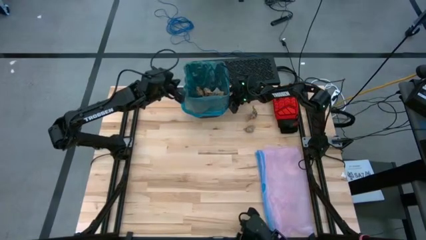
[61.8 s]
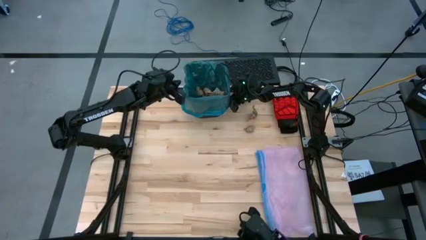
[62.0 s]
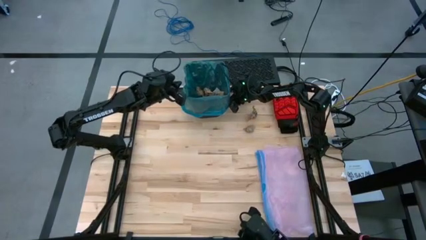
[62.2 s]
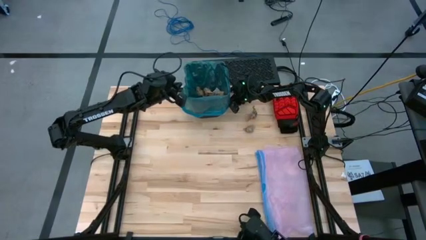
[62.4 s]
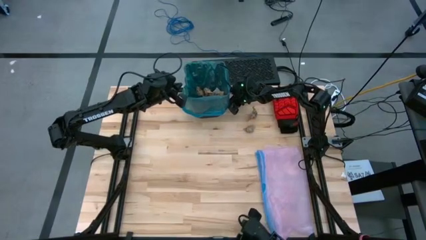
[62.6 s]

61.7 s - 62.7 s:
Task: place trash/remove bag and relplace
Put the brown paper into the black trash bin

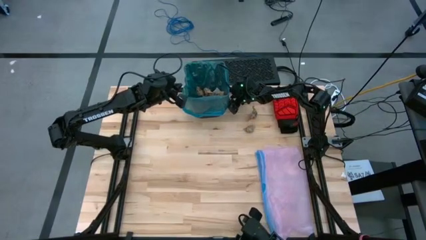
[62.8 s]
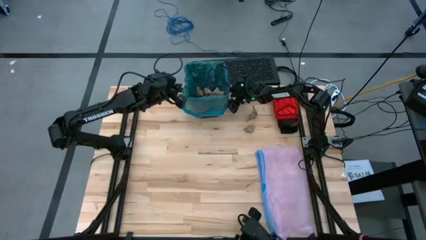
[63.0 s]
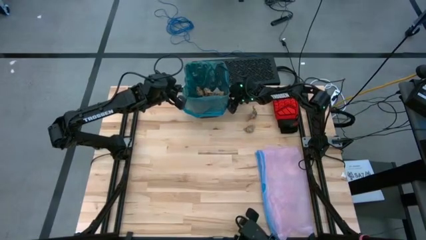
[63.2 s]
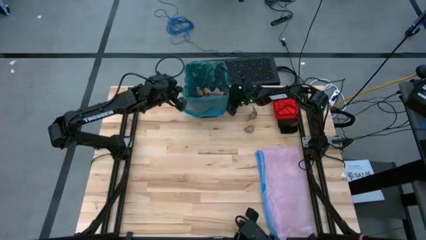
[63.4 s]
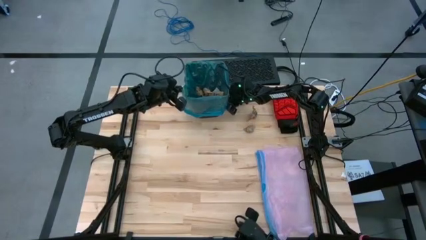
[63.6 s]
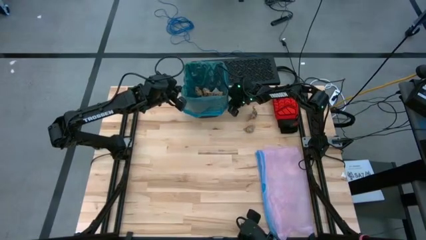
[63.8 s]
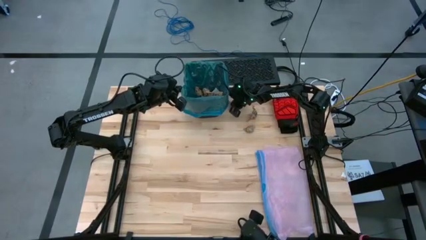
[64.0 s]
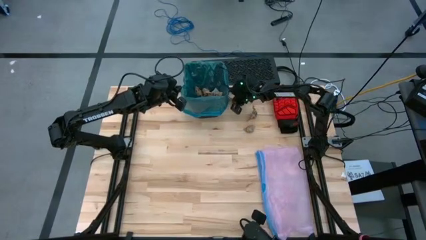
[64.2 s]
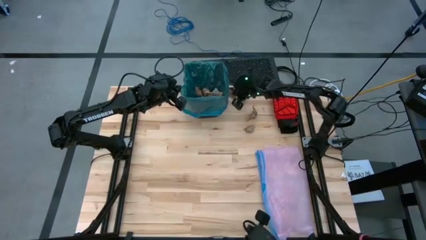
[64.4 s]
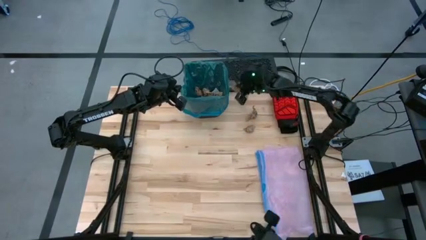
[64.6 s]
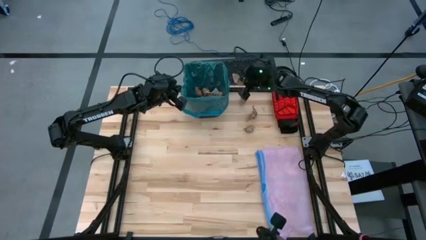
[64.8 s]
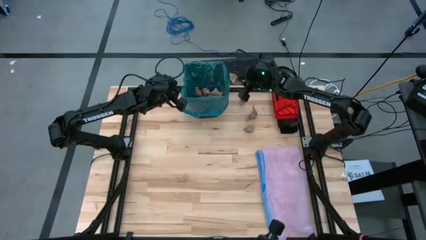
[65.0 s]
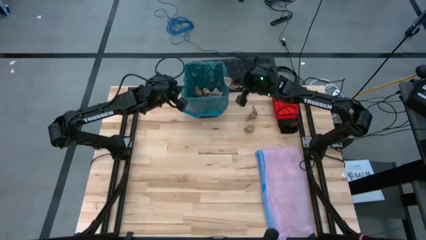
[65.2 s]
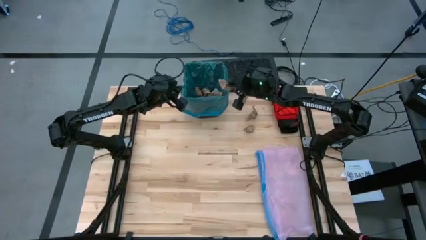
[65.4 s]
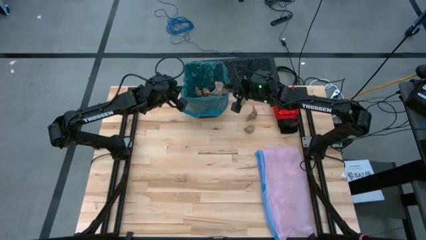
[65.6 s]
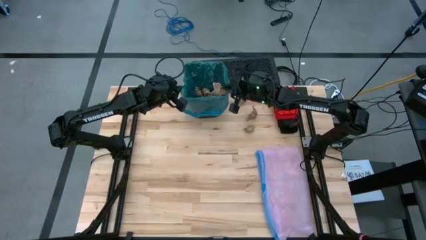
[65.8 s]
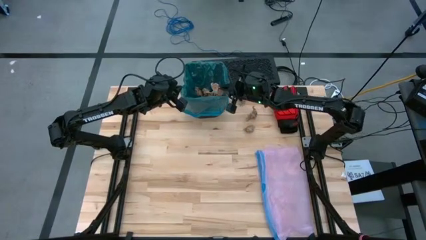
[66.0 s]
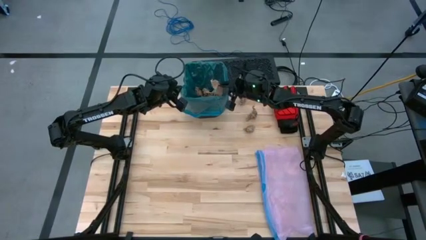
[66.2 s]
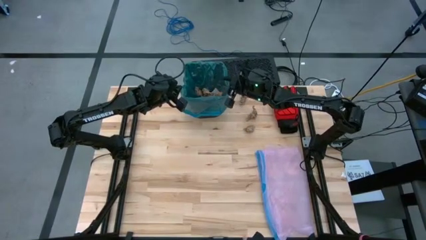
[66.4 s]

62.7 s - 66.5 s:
Put the brown paper into the black trash bin

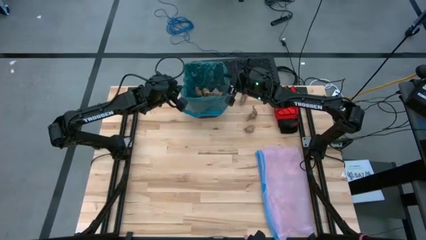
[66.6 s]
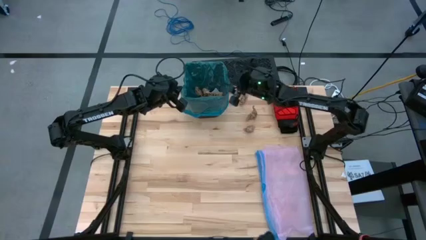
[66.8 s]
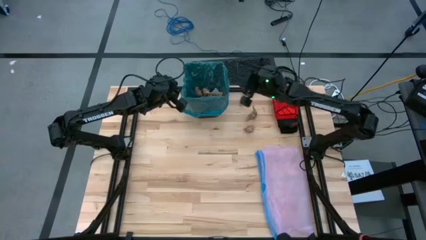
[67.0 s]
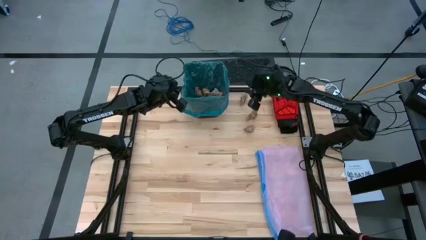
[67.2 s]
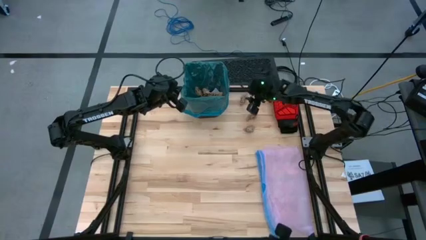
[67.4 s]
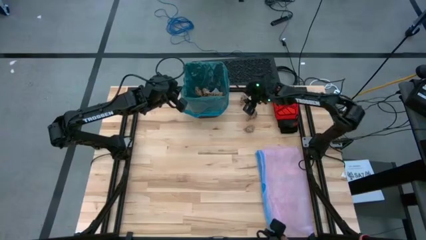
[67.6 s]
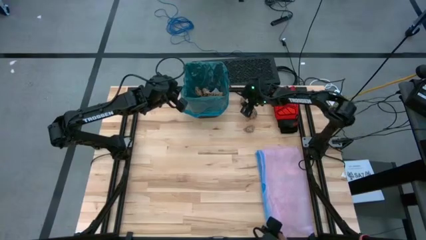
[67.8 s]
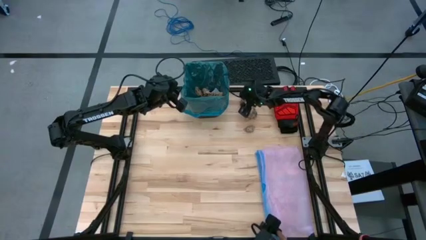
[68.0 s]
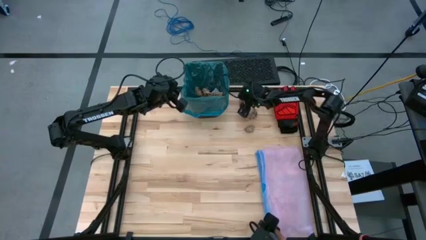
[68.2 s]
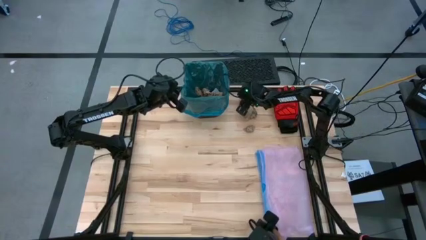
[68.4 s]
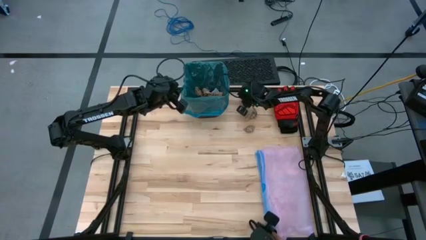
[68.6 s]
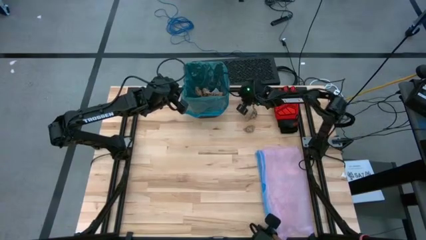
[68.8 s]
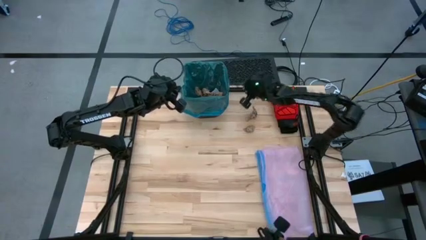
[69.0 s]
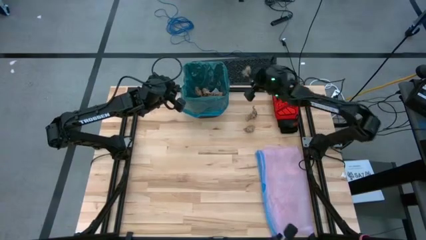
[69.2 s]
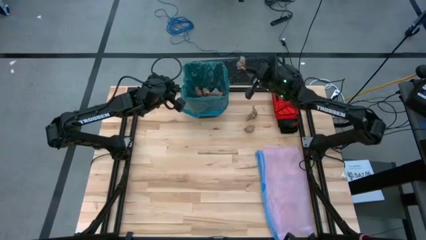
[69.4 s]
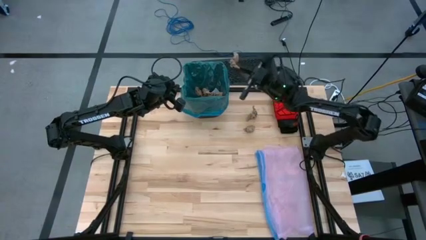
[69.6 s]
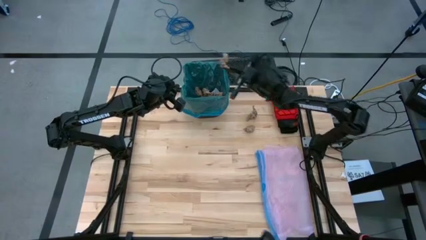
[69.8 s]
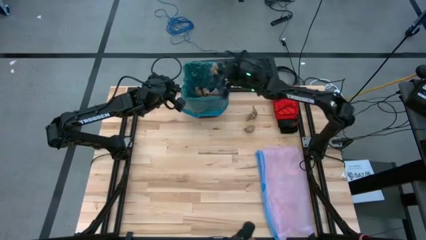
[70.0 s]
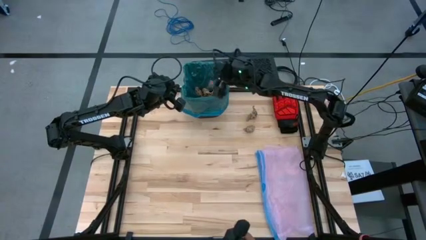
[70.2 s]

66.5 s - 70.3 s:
Put the brown paper into the black trash bin

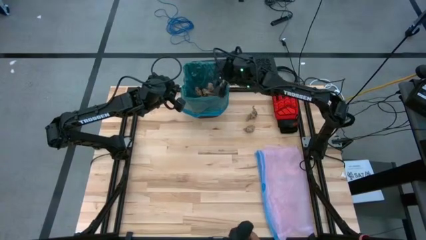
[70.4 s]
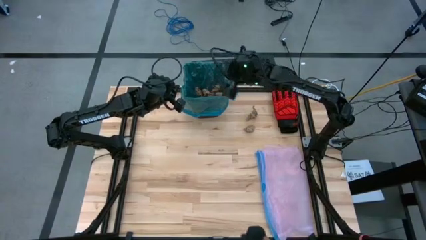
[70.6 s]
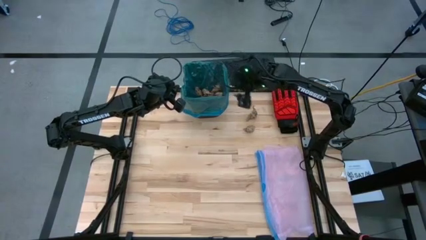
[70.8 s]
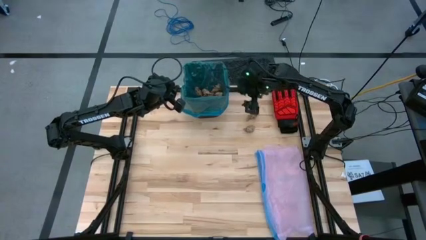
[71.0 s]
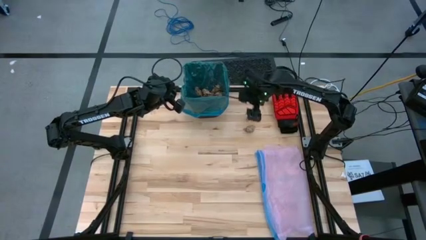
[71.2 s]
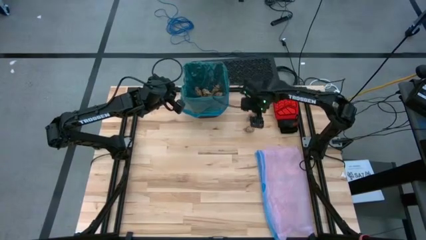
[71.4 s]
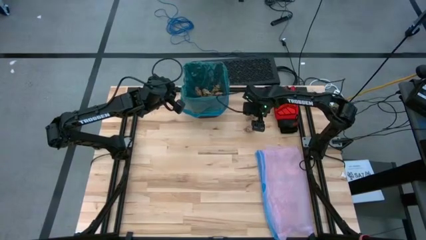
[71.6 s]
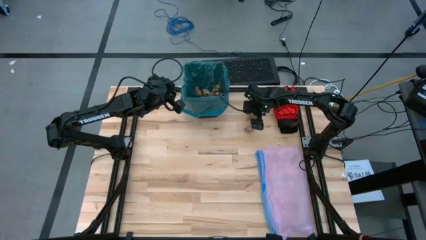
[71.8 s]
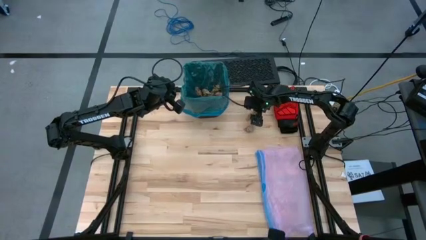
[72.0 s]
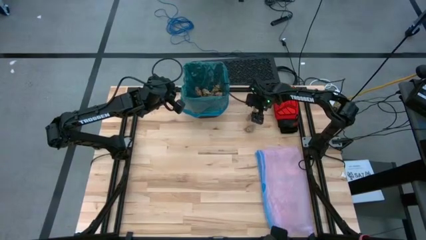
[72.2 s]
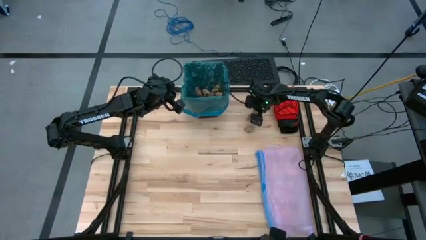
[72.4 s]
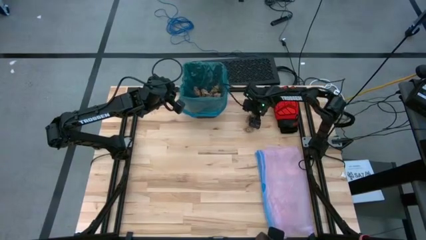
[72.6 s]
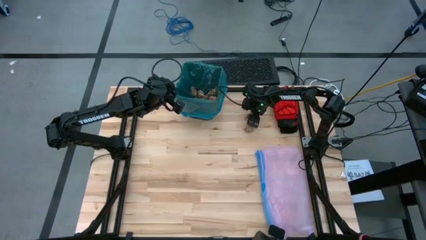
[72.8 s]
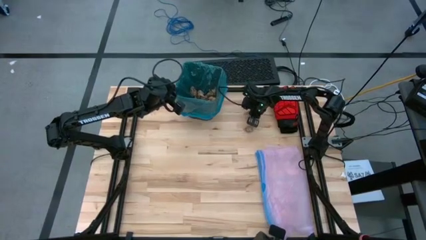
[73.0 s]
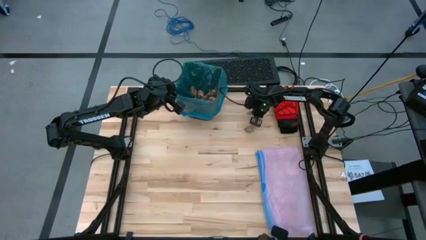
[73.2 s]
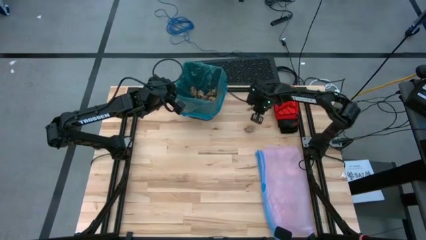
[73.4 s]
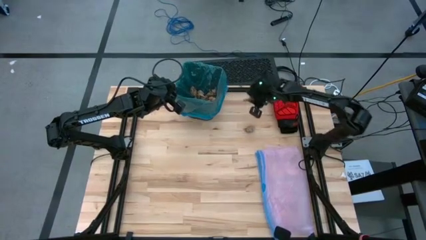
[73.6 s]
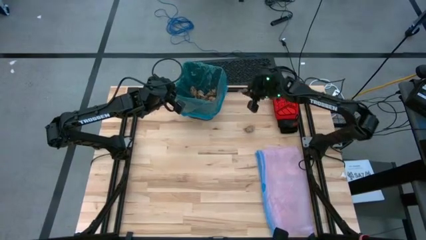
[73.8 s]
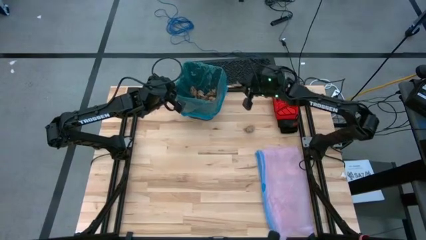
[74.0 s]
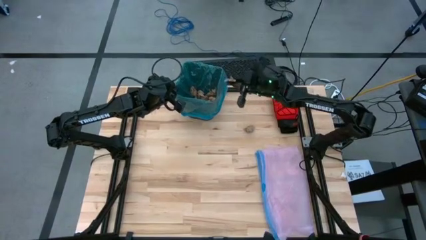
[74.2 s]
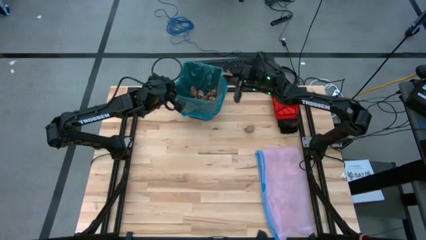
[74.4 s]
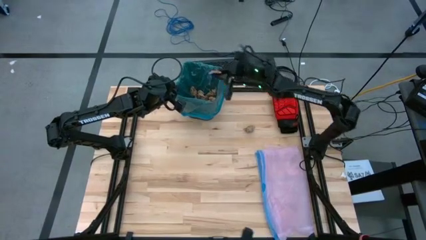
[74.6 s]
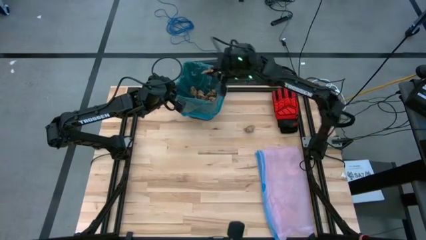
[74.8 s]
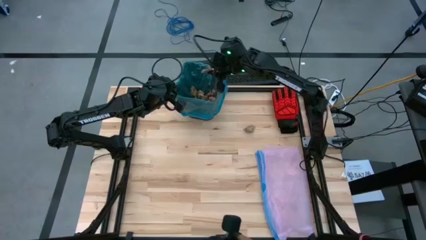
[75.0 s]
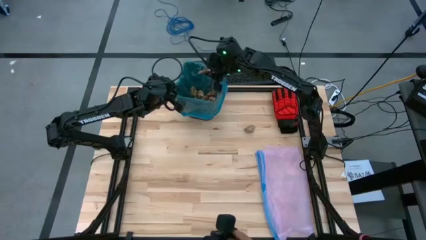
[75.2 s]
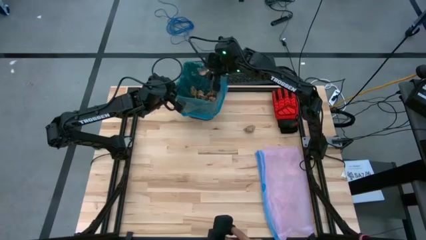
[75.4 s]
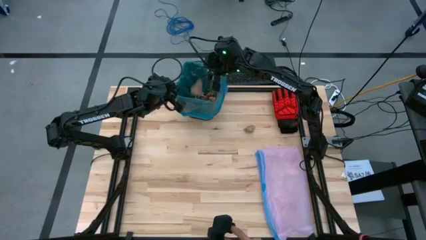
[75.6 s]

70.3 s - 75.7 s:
Put the brown paper into the black trash bin

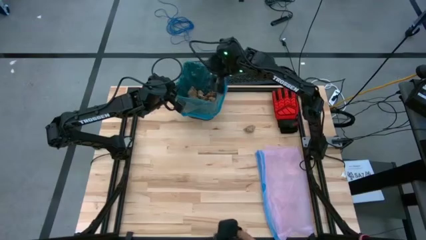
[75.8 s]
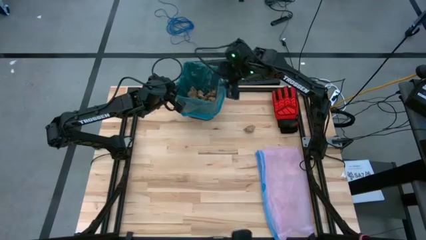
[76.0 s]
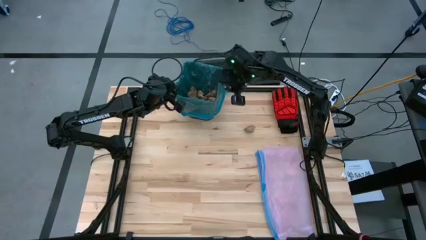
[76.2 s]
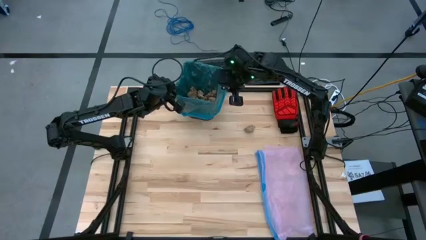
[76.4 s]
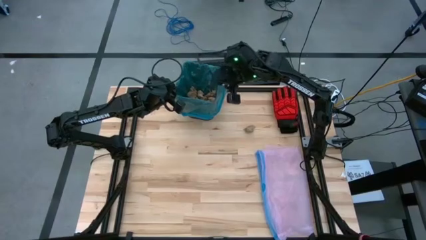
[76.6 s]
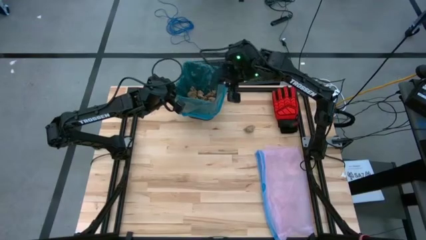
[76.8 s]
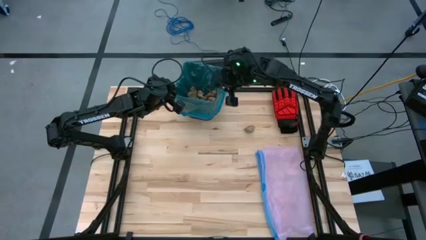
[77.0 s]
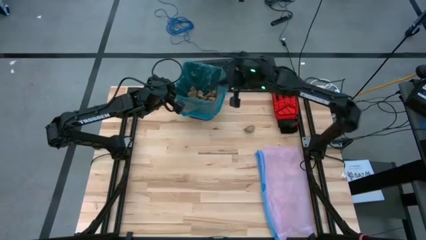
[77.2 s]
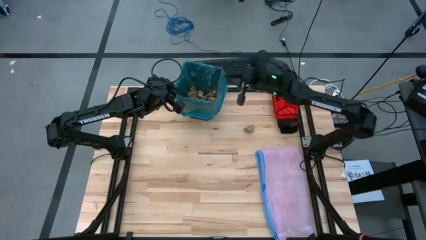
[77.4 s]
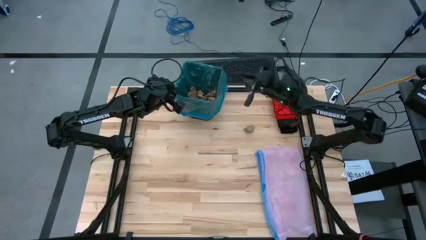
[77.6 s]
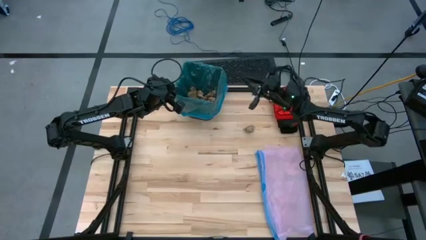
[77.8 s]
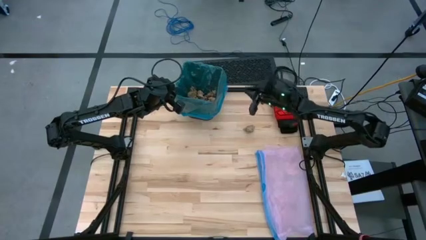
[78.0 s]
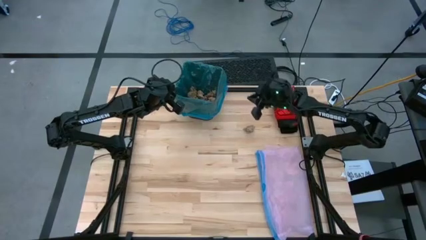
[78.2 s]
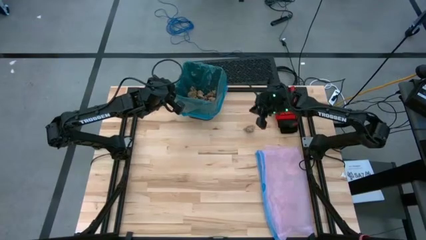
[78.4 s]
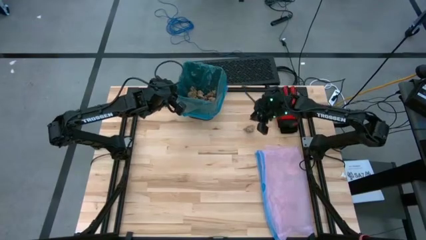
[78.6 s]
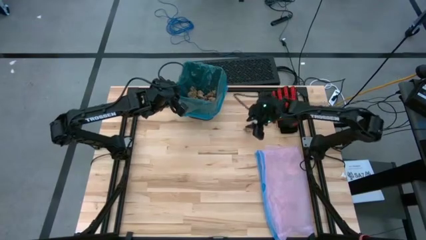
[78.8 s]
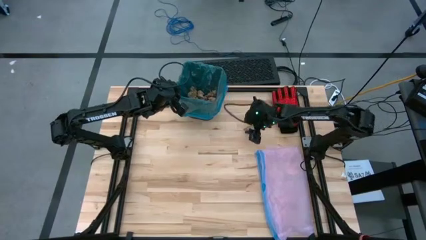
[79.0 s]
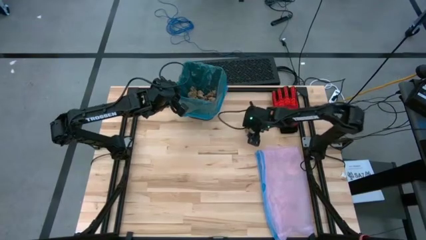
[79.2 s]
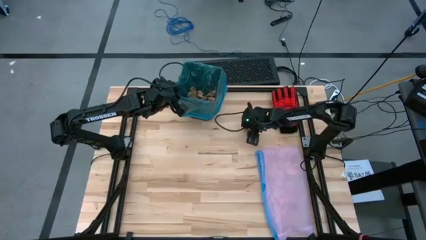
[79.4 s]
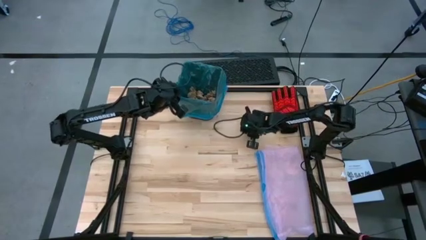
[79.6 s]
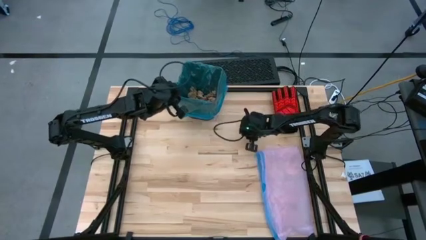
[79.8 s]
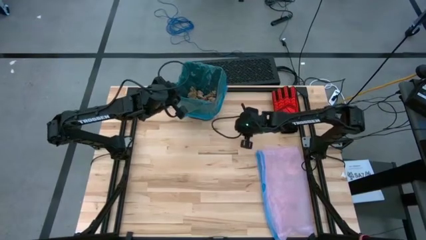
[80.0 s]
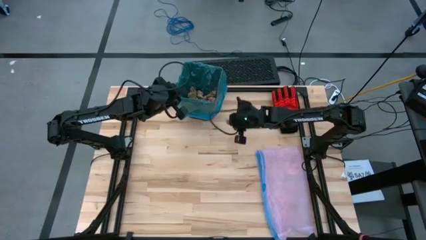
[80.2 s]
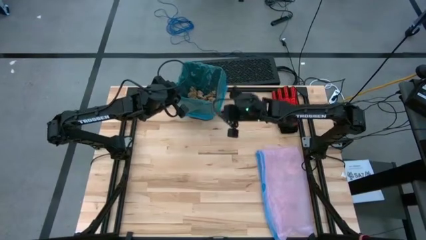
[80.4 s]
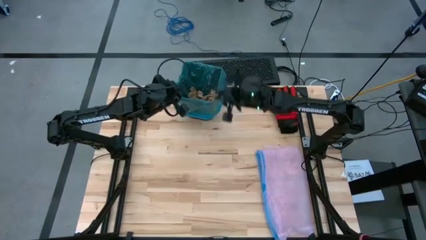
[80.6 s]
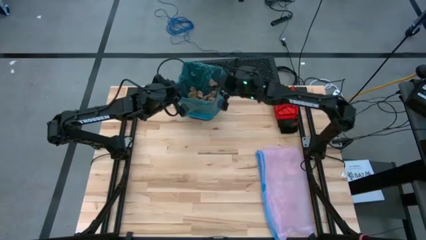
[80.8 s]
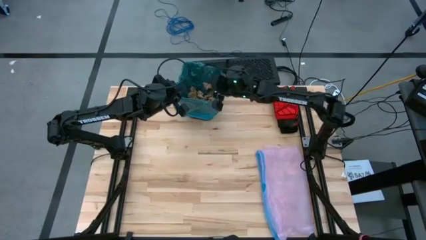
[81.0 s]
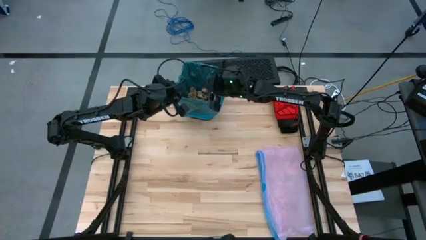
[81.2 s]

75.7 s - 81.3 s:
Put the brown paper into the black trash bin
